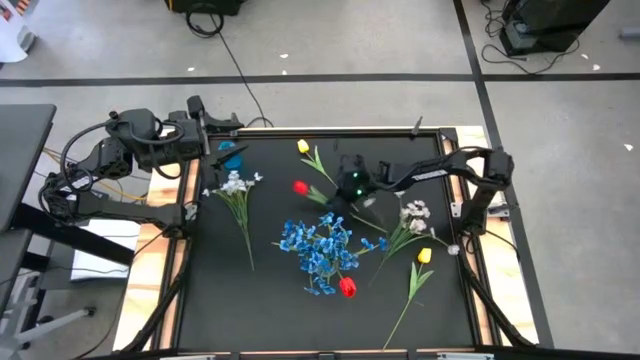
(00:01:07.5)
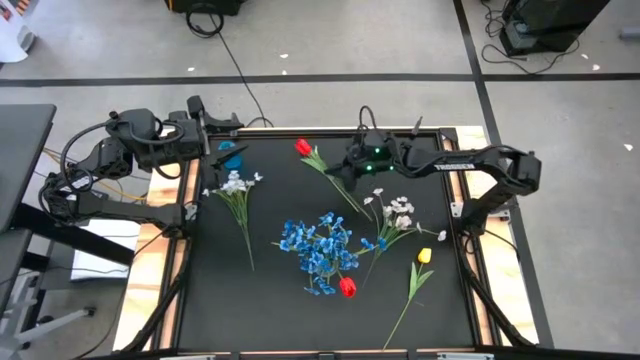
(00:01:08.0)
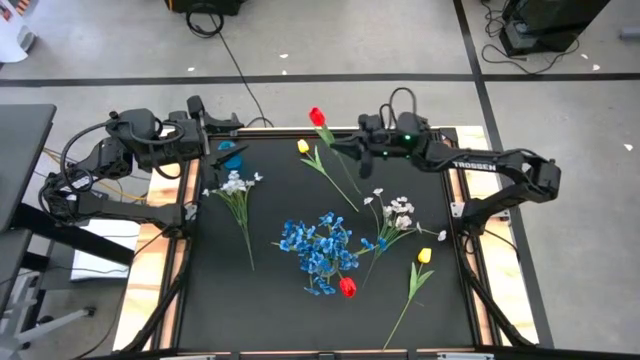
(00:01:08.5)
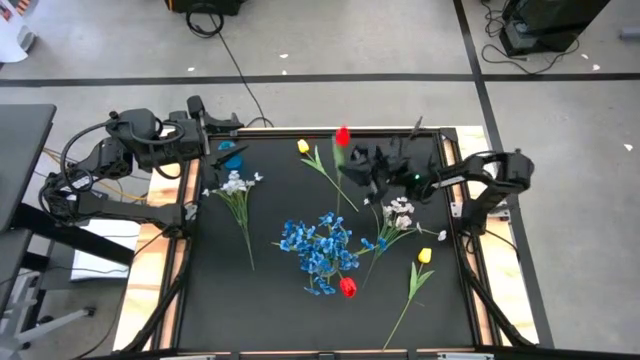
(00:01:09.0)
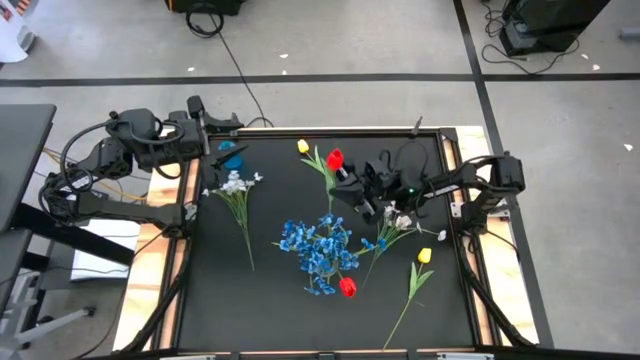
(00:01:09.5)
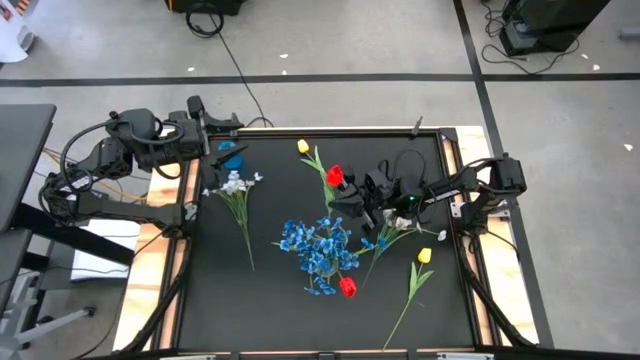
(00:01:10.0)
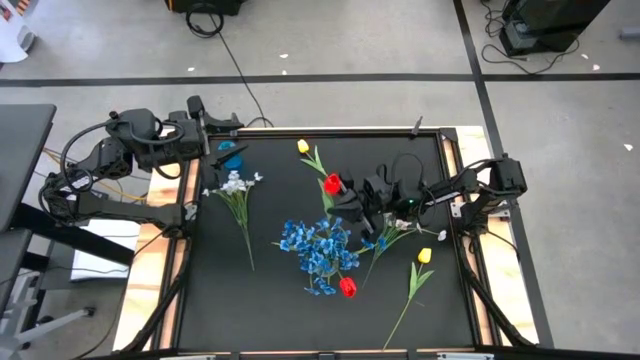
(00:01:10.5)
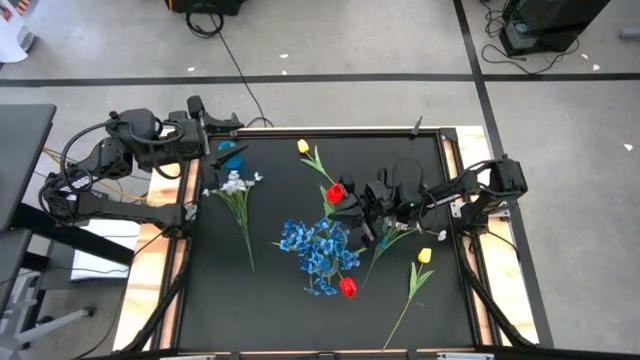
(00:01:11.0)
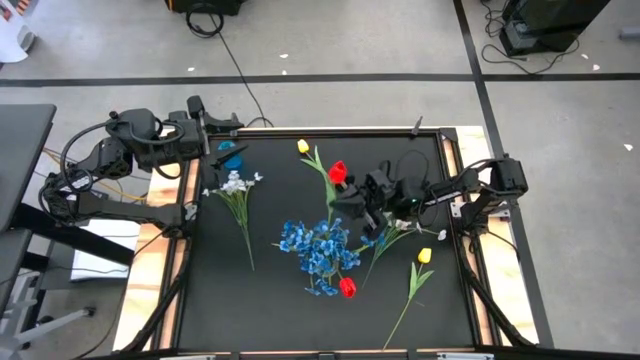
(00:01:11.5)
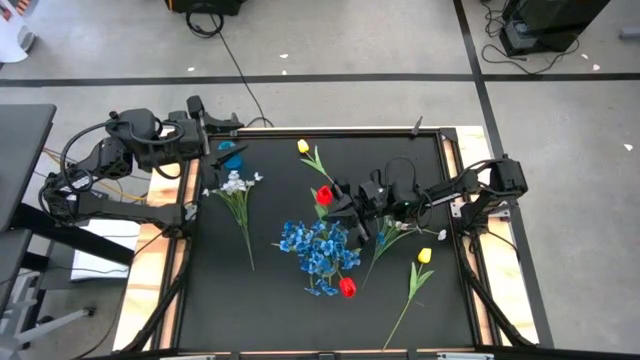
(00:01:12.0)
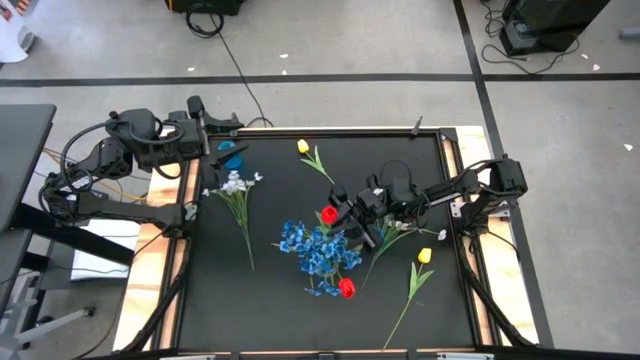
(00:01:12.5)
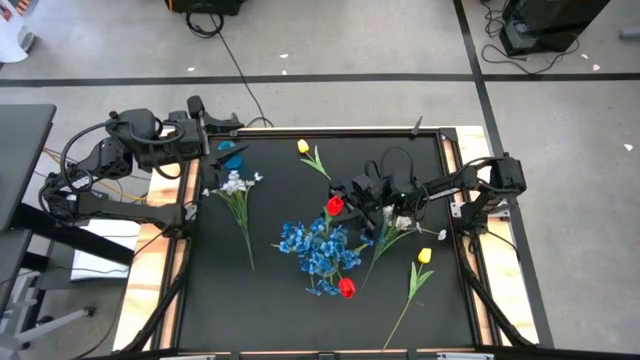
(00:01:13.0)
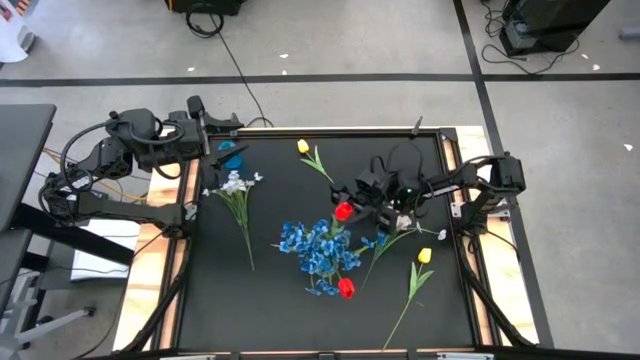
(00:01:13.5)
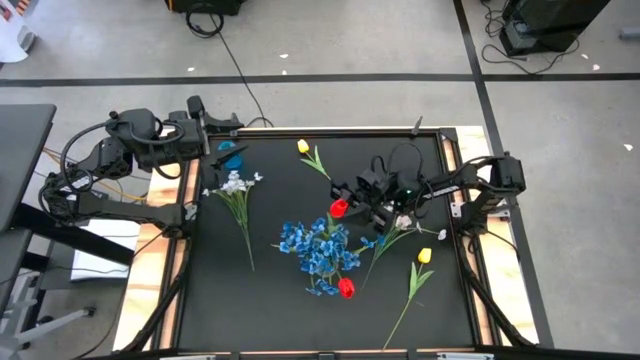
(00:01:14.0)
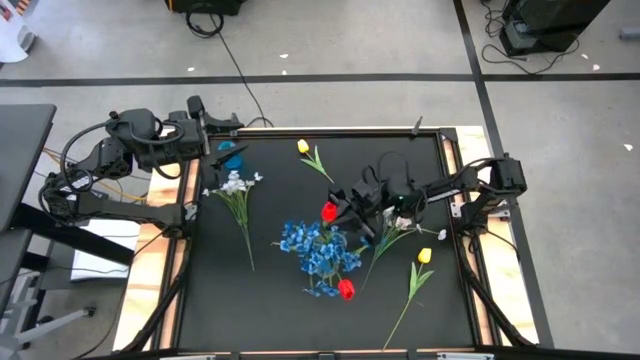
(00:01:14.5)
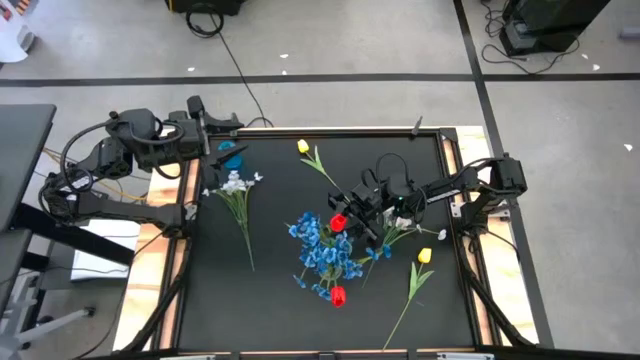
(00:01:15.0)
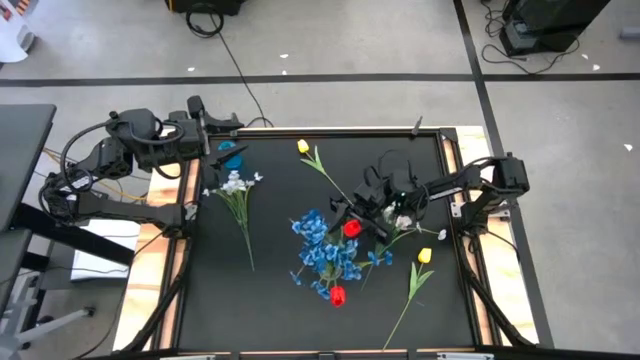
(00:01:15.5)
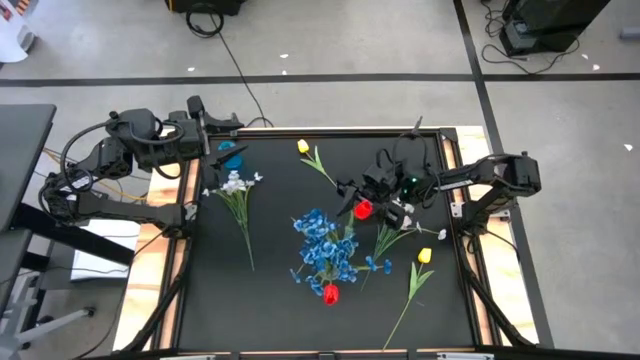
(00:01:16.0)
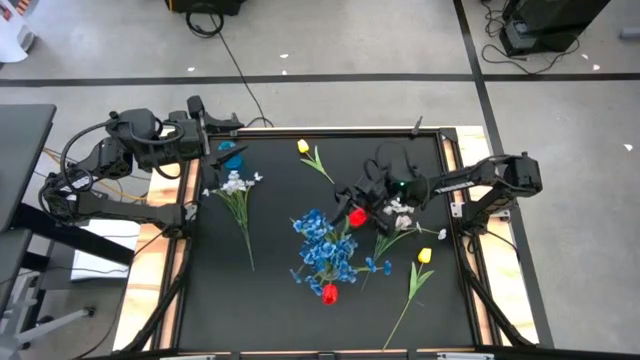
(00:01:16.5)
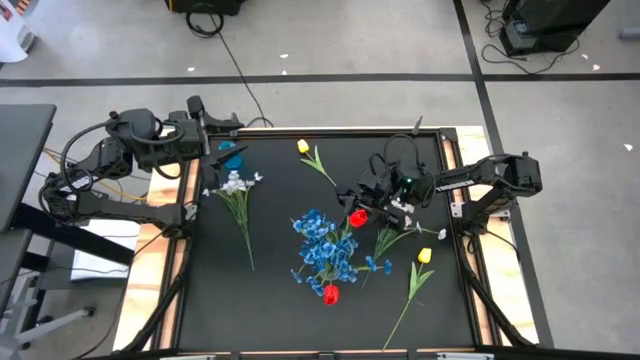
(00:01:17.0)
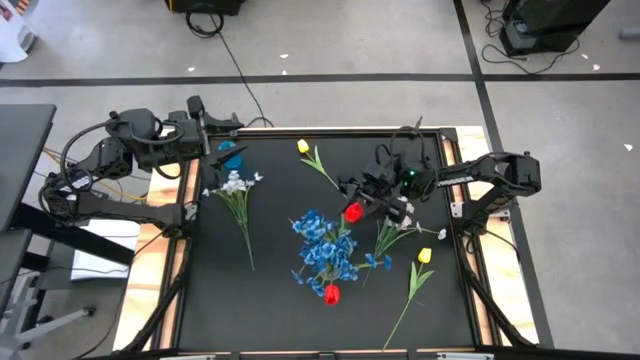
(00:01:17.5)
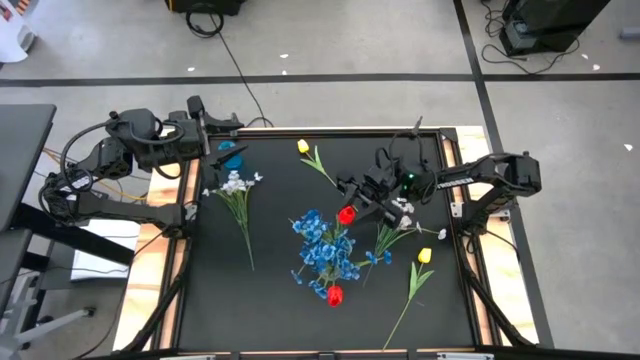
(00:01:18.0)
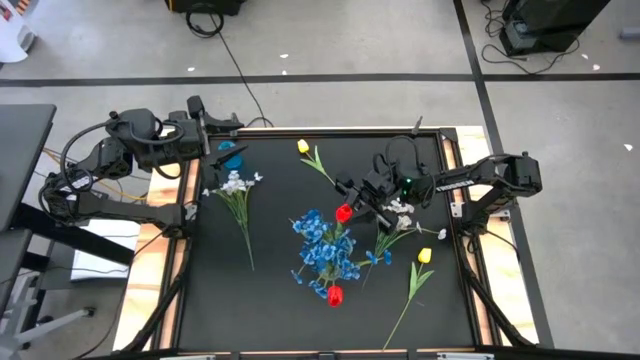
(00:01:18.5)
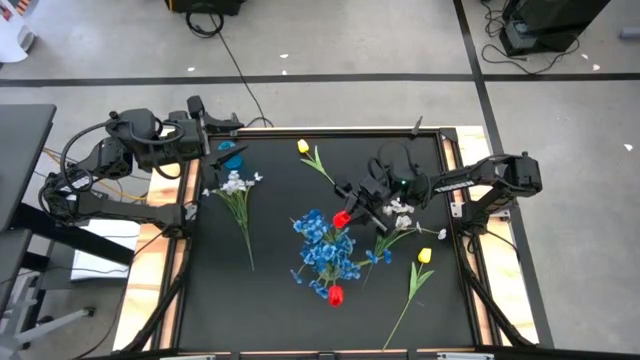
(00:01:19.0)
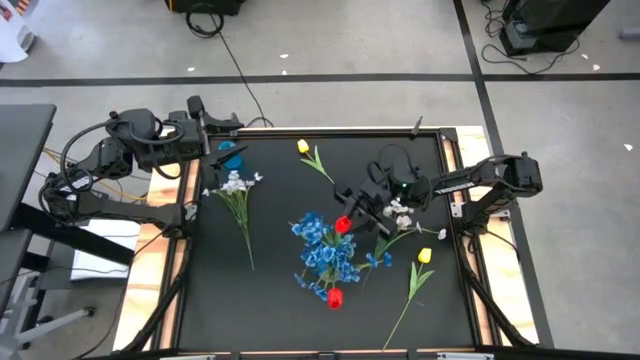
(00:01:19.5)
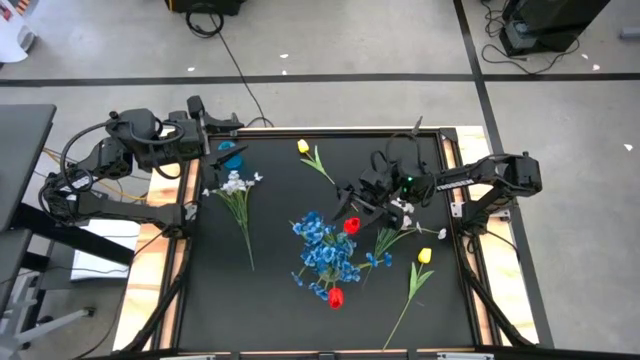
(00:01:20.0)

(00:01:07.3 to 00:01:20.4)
Task: Sort flowers into vase by color
Put the red flower into the transparent vase
